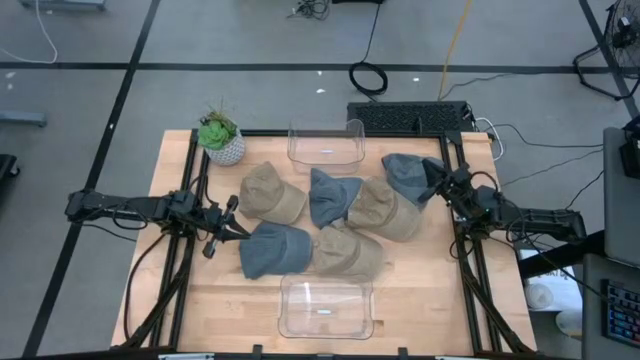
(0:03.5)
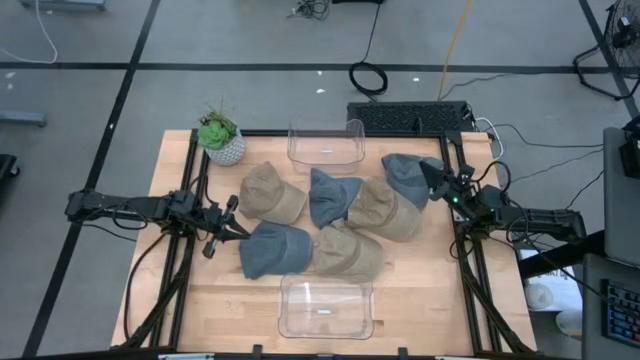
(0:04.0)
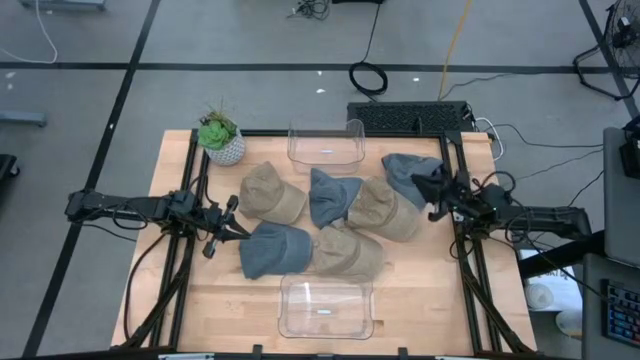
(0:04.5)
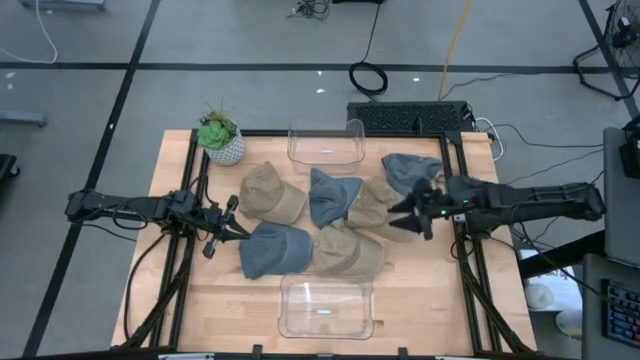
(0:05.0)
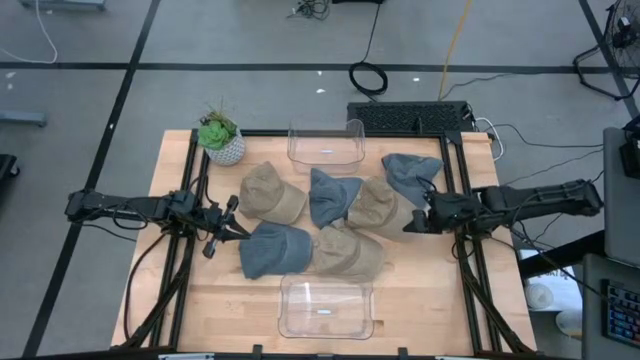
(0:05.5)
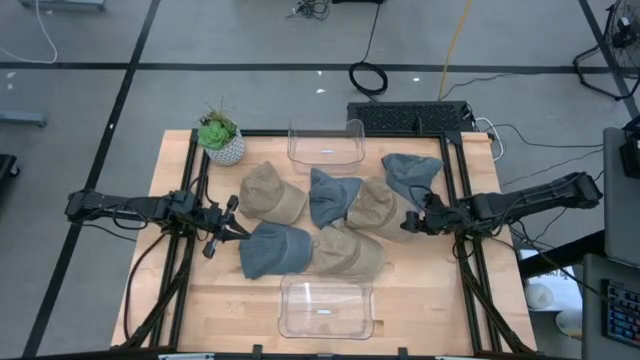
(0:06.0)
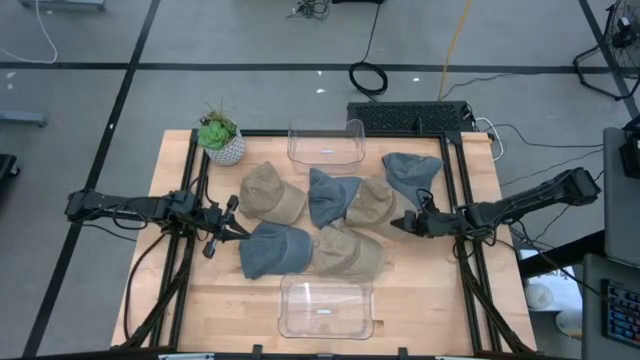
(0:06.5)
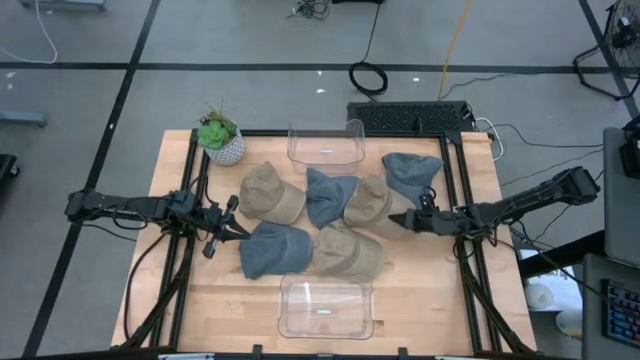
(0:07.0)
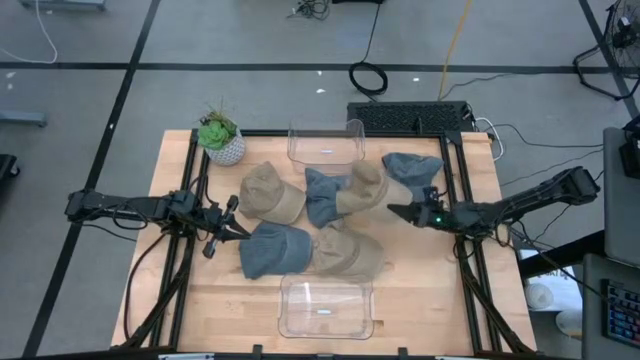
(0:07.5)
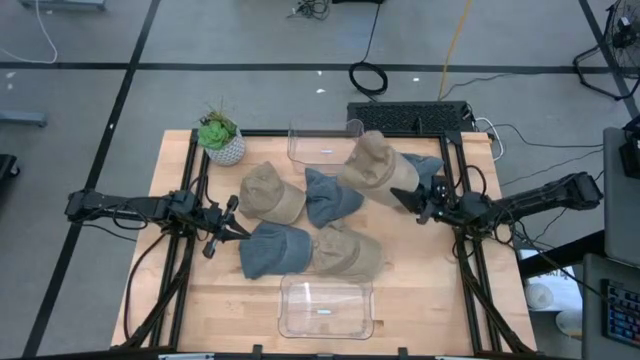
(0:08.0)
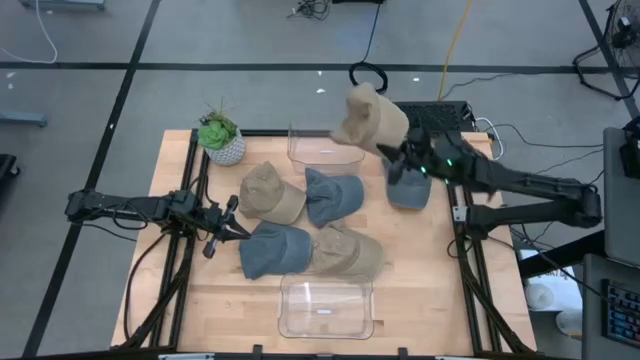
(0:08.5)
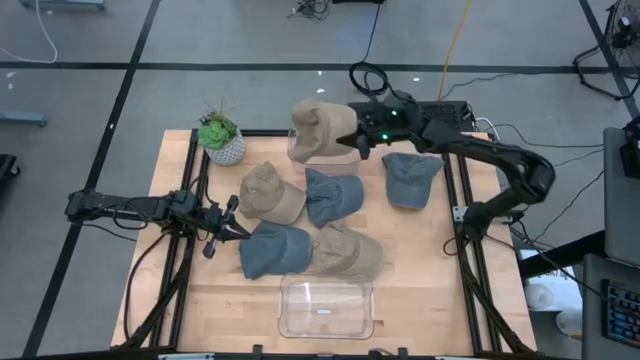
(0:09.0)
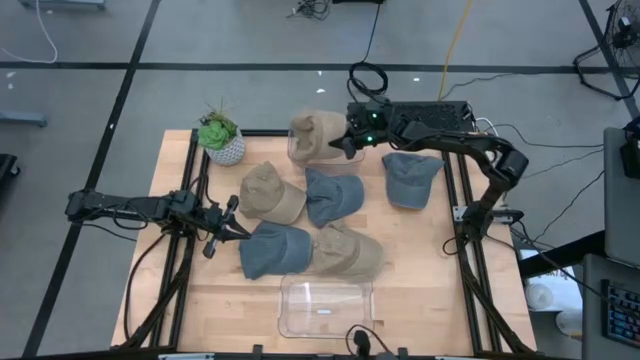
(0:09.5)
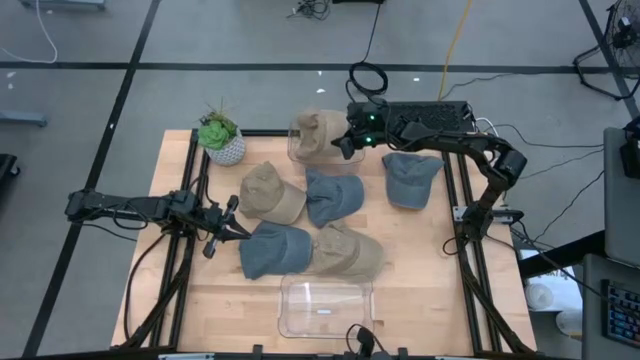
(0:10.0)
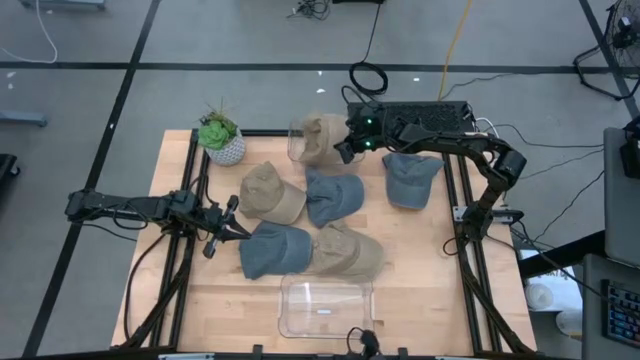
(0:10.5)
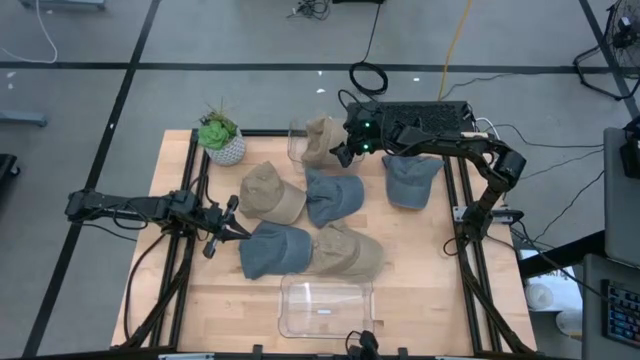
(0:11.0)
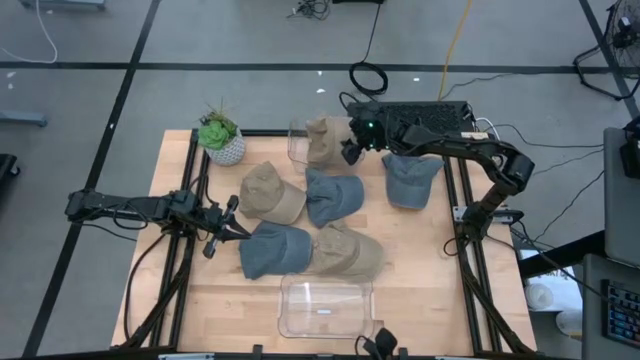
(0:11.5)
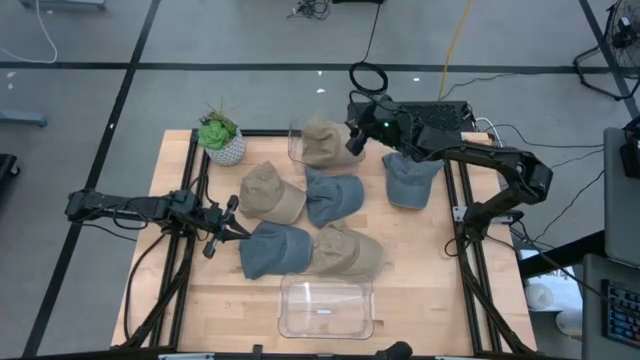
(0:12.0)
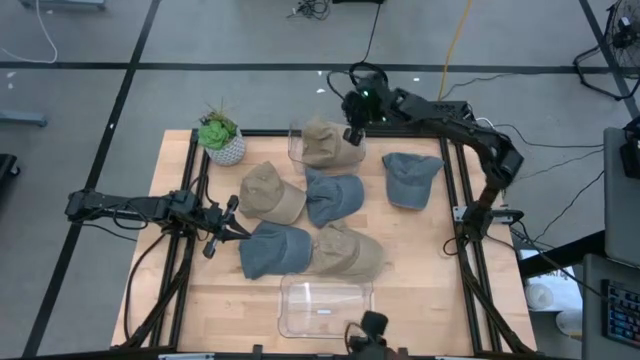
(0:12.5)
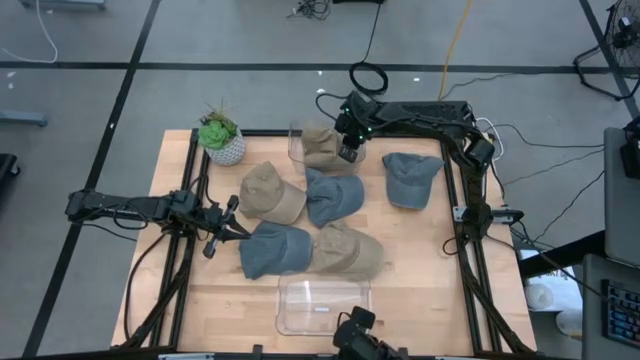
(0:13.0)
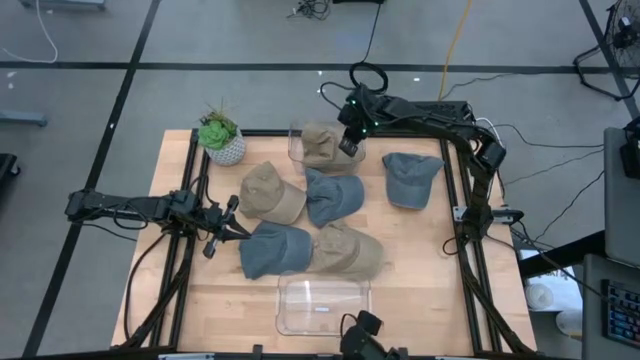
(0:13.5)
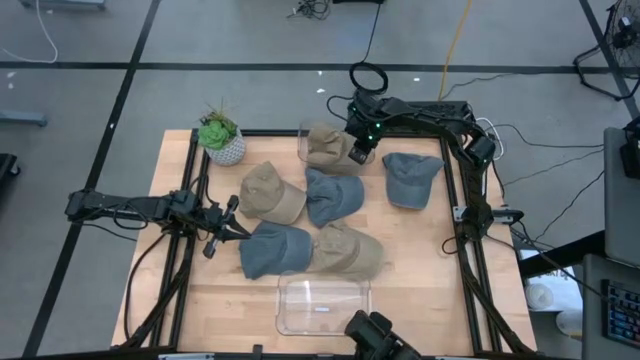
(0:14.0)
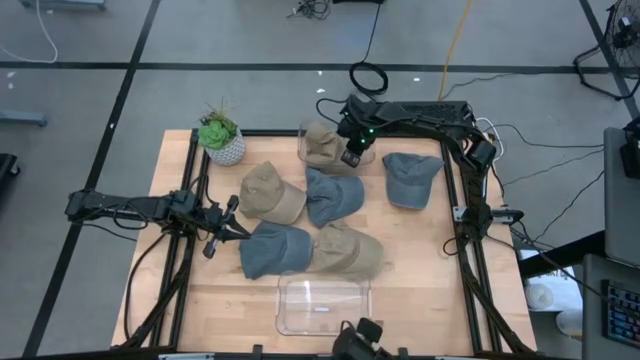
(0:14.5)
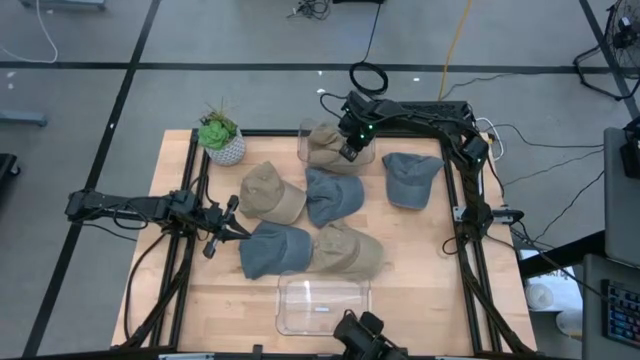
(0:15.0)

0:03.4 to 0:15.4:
Task: Pick & Place hat
Put the top right brown cap into the top transparent bin

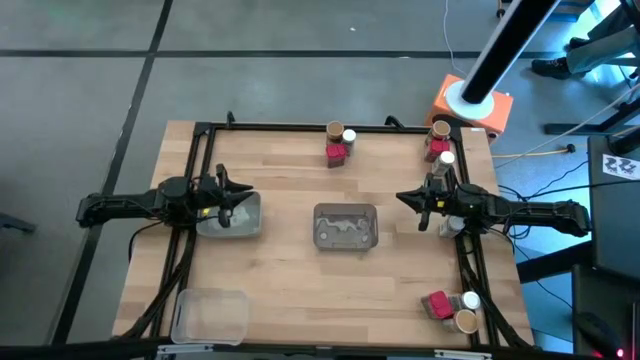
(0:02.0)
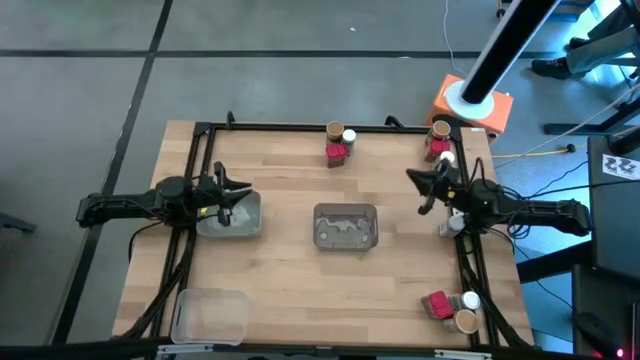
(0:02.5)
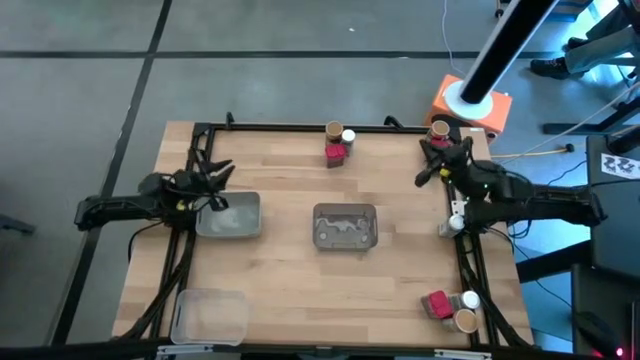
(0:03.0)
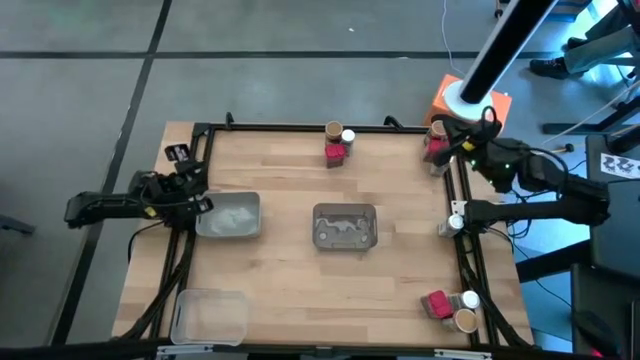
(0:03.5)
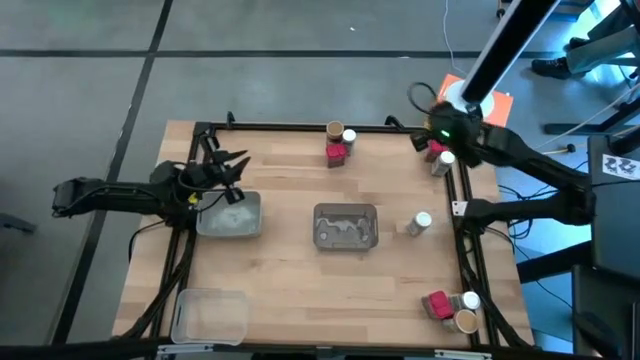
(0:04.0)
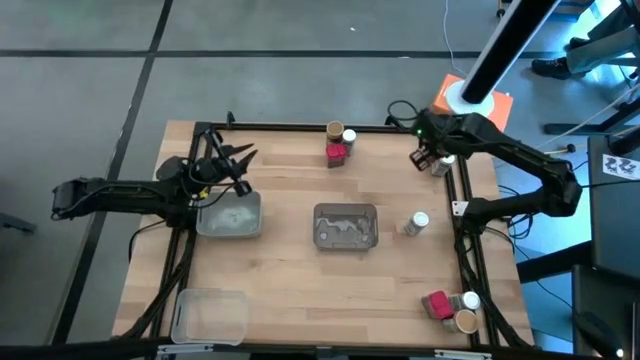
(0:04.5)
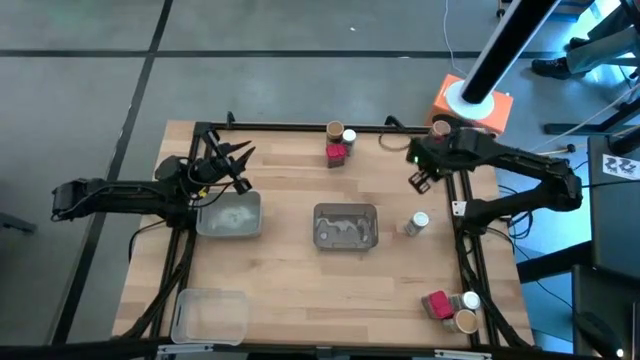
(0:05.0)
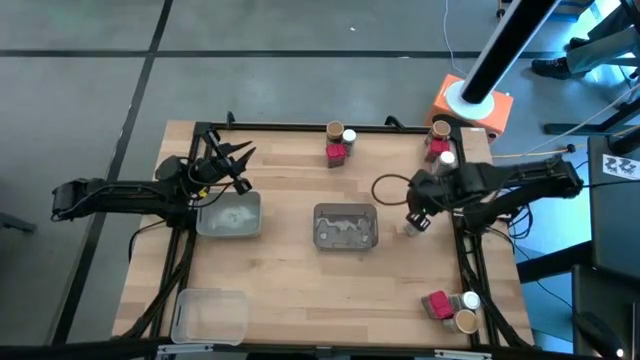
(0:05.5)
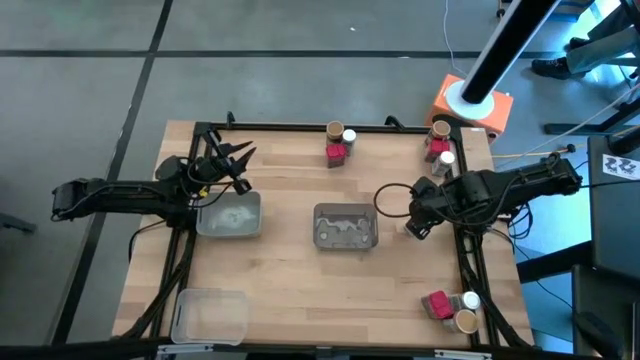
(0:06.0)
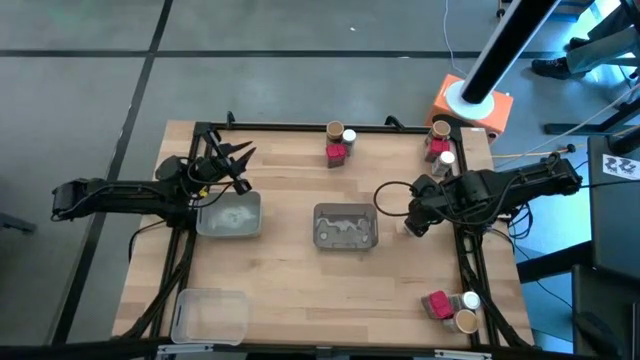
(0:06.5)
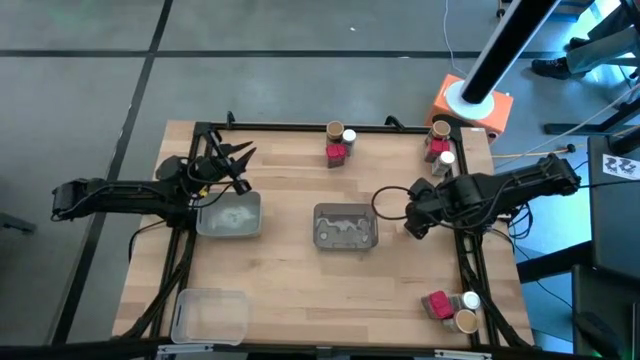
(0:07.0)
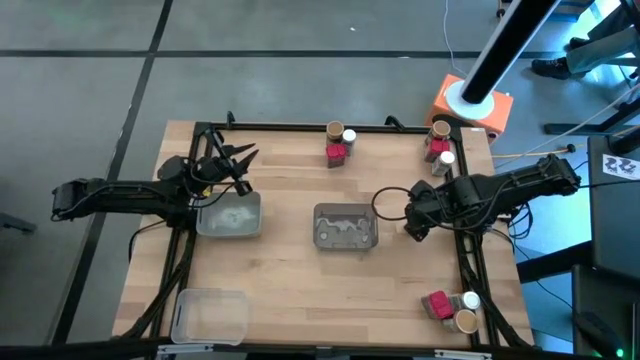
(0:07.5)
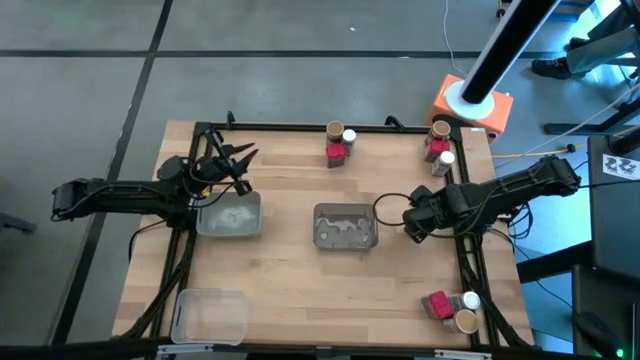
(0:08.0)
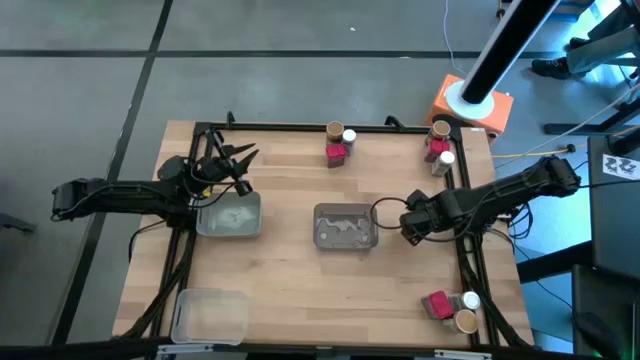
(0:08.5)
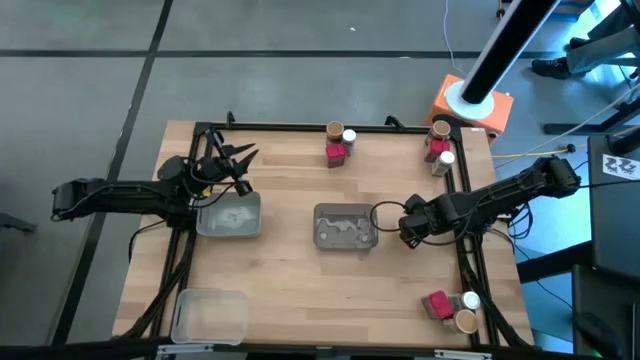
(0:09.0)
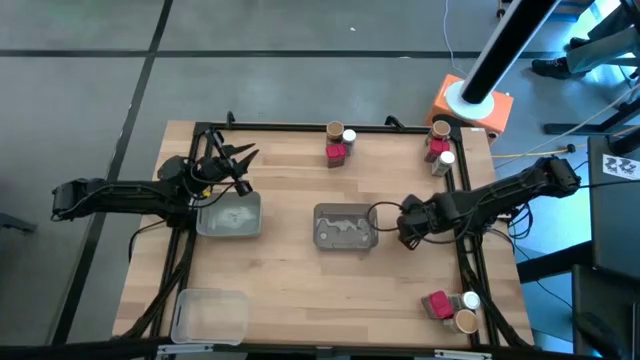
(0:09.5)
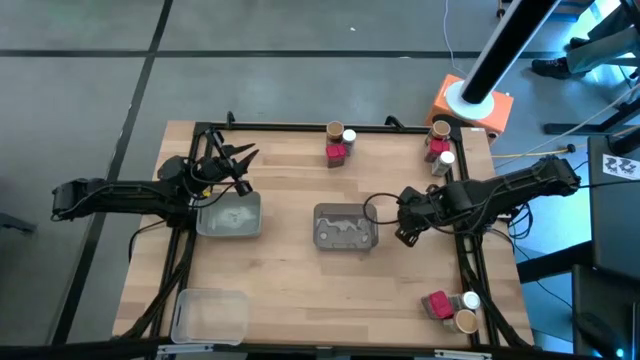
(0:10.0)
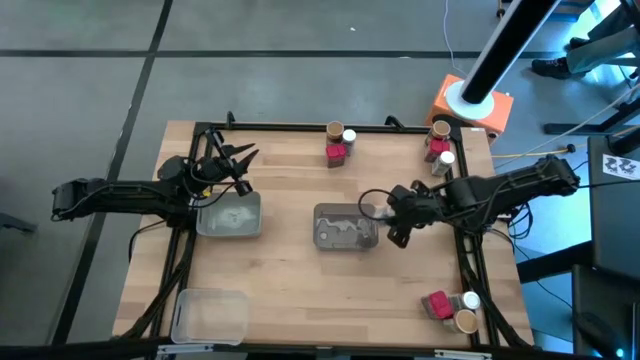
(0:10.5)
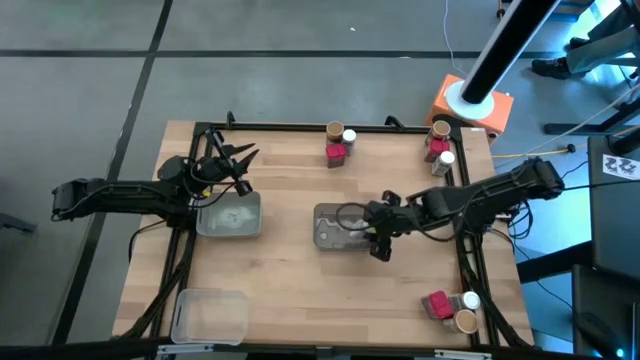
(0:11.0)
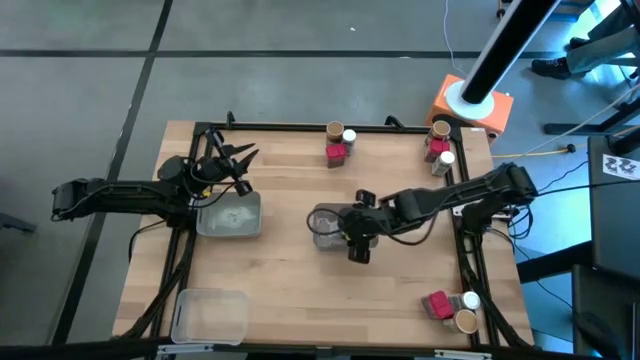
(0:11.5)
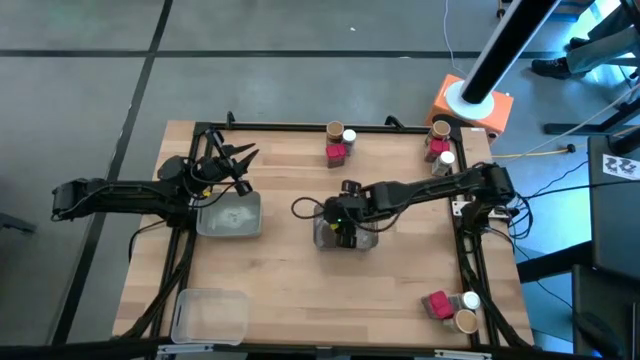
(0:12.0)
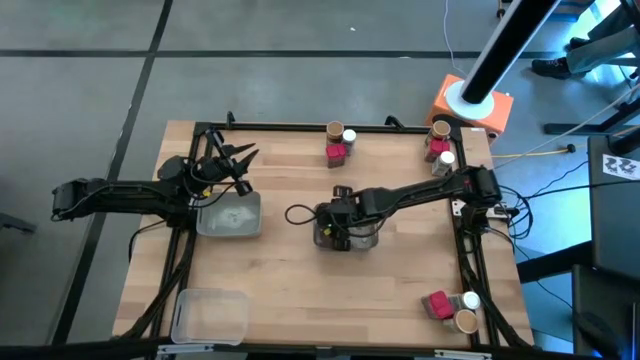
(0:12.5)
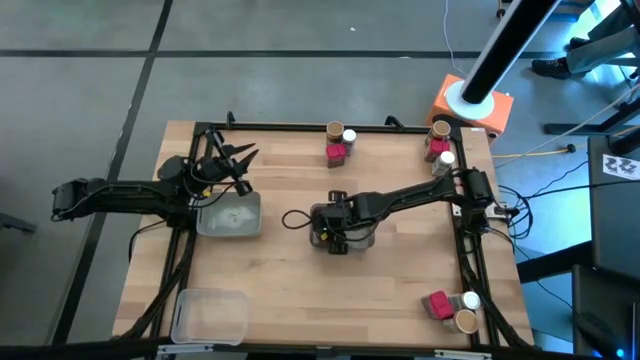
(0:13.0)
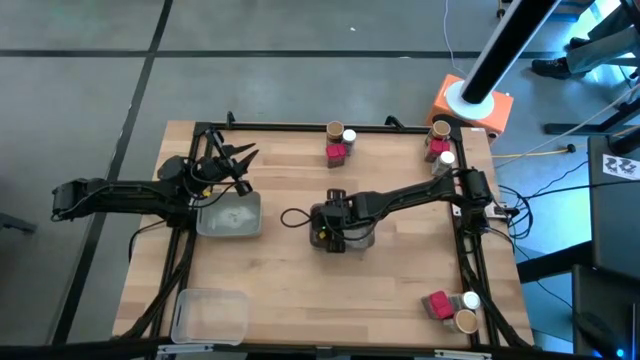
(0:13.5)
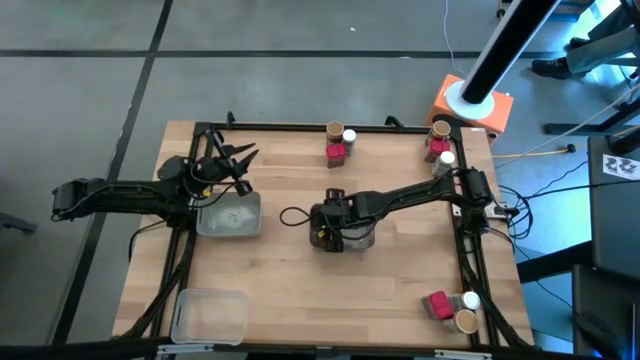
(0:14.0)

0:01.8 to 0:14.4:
Task: Sort spices by type
Put the middle white seasoning bottle into the black bin
